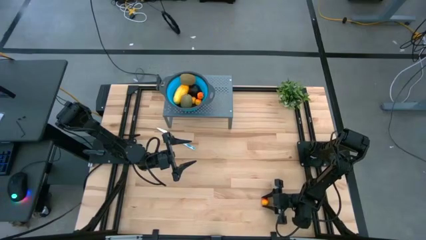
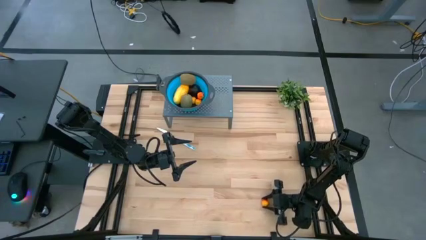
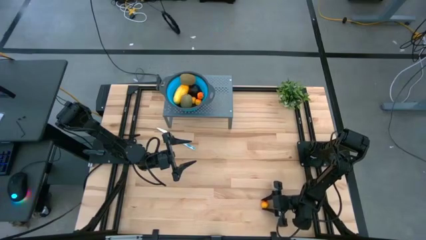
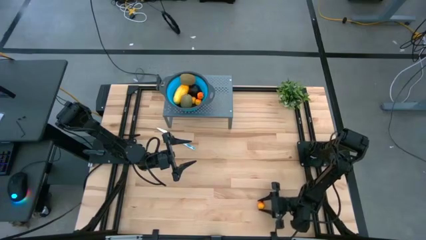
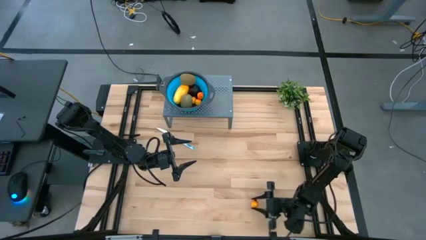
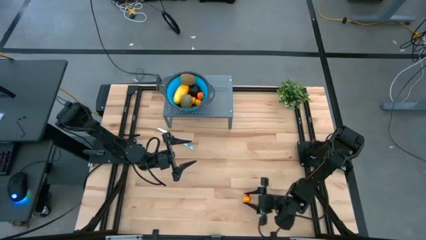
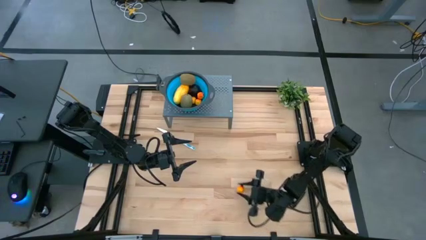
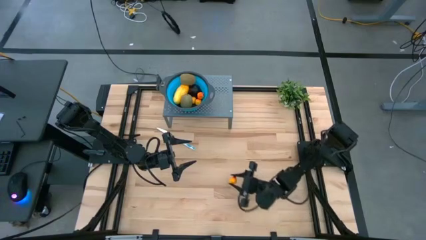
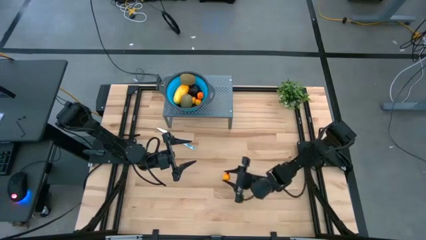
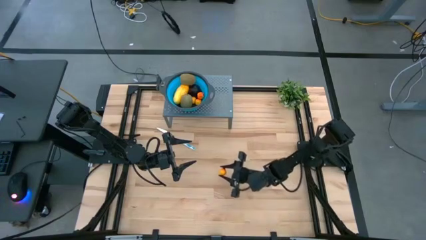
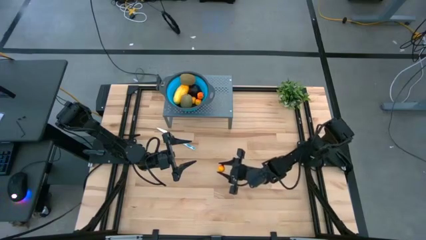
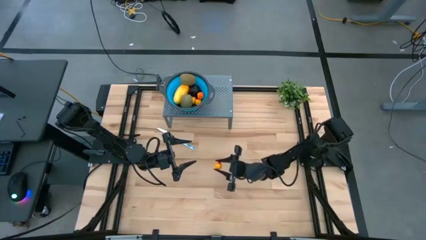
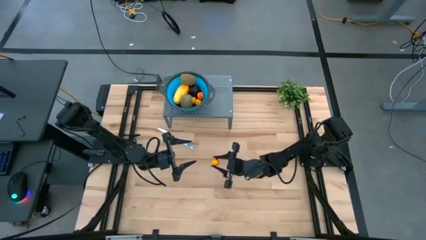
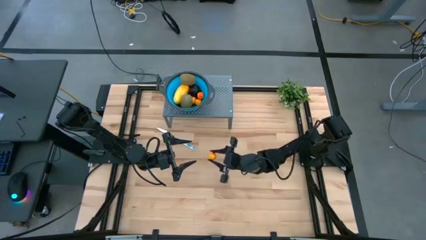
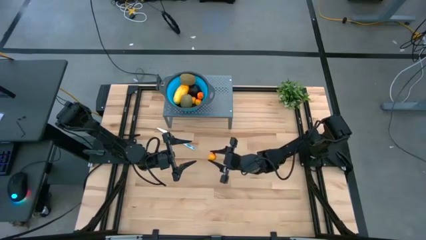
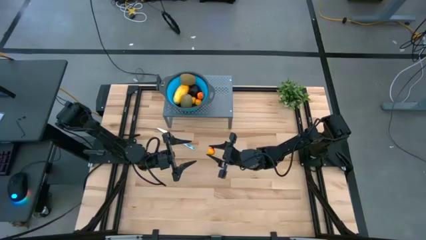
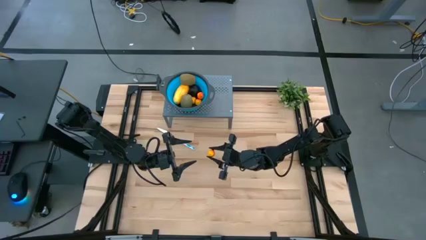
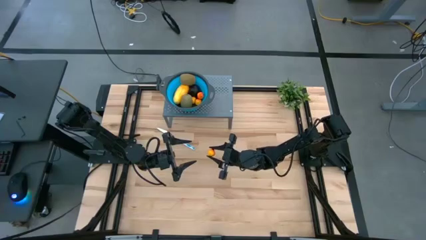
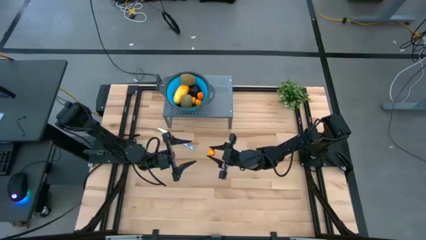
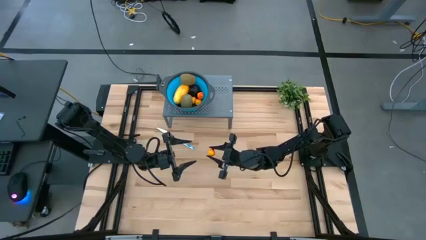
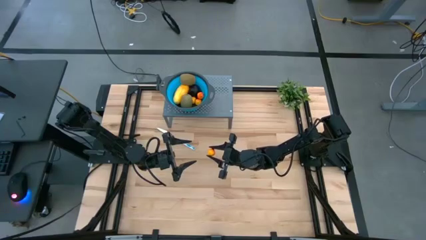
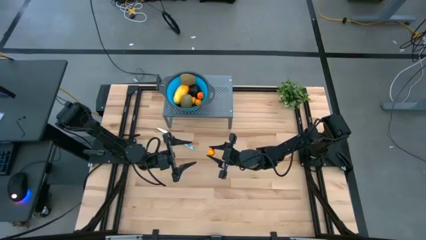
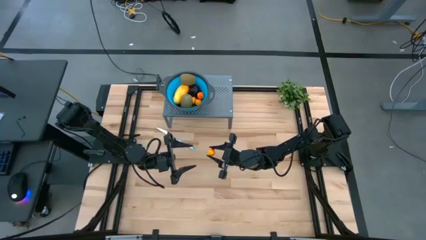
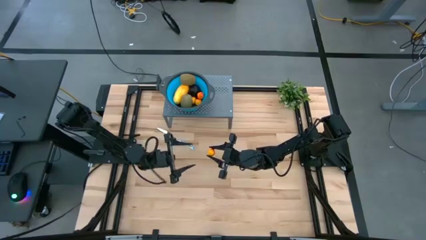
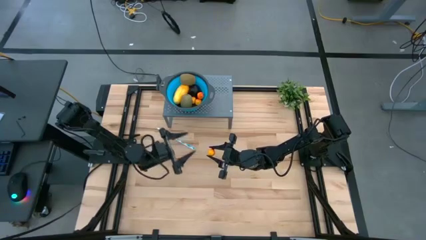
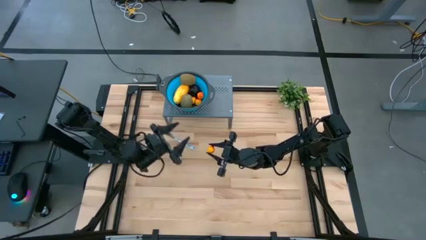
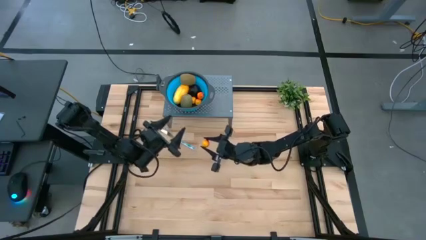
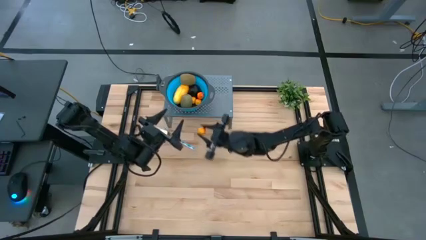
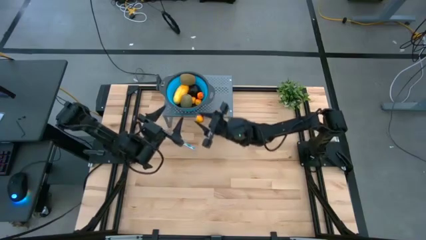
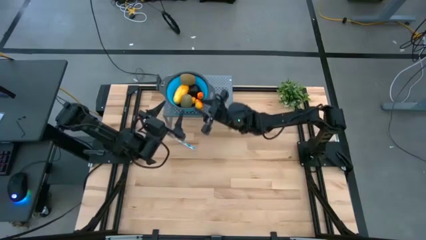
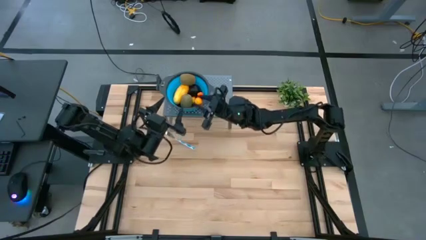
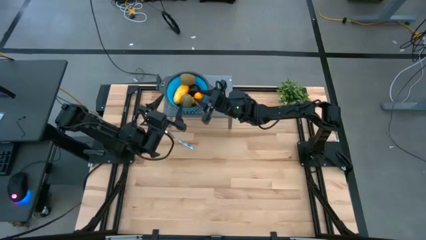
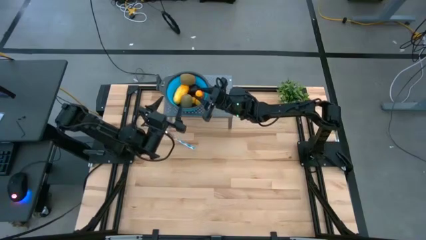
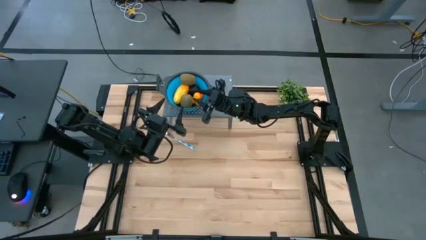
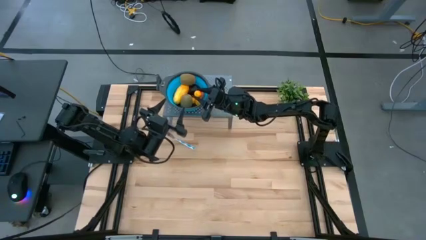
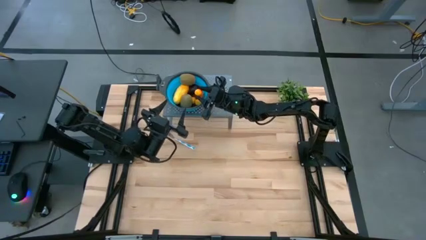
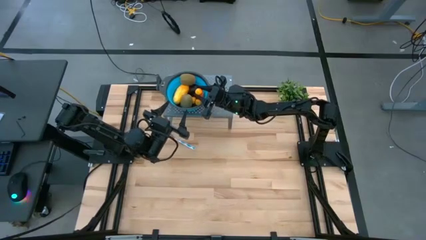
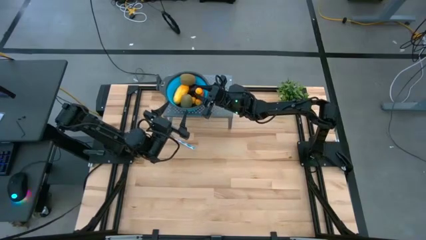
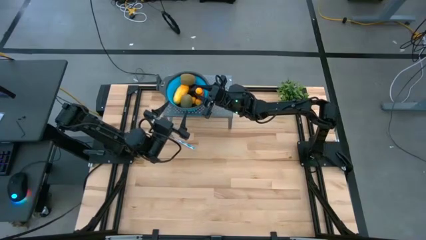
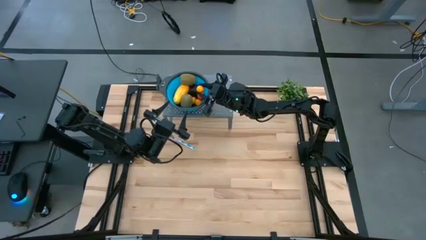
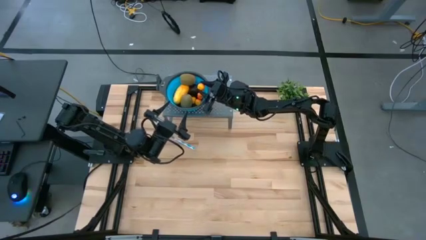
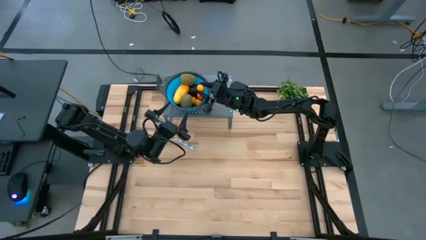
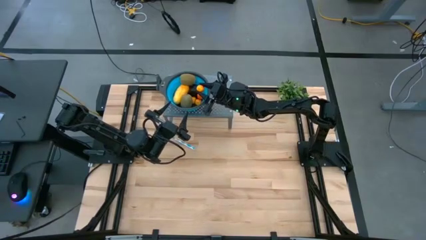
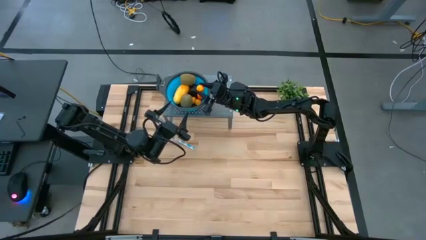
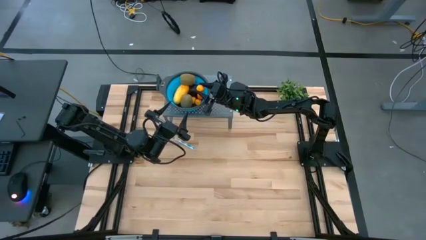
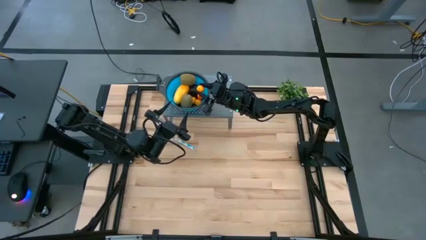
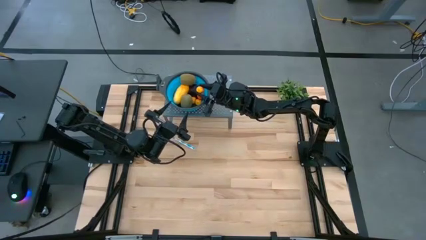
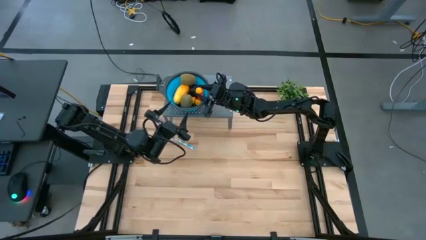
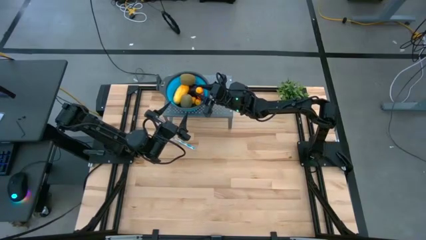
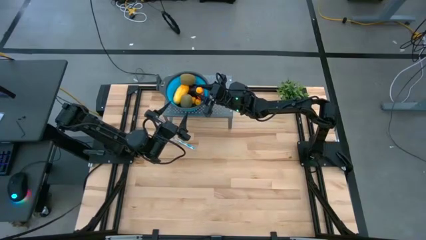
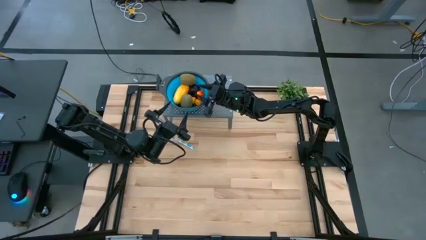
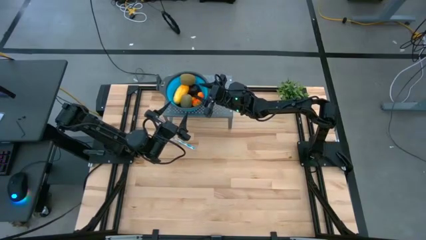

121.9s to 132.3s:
Task: Pick & Place Fruit
Put the pear into the blue strainer bowl
